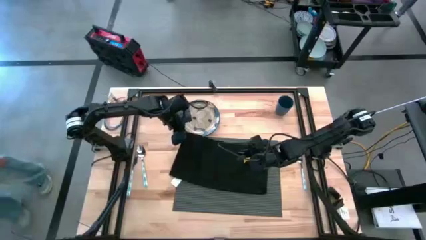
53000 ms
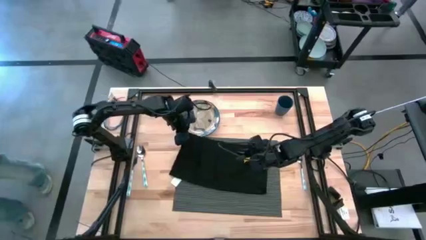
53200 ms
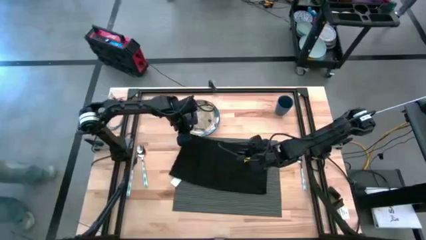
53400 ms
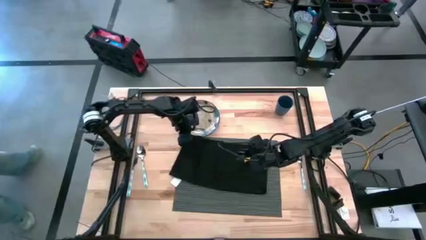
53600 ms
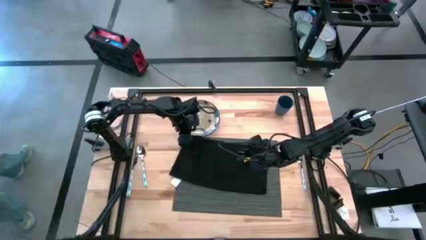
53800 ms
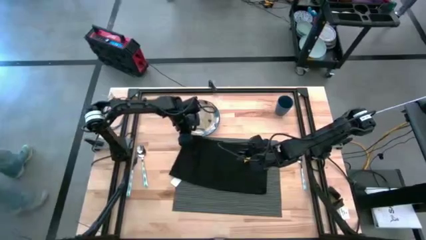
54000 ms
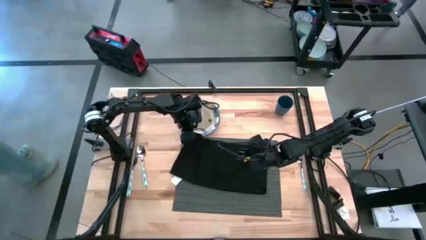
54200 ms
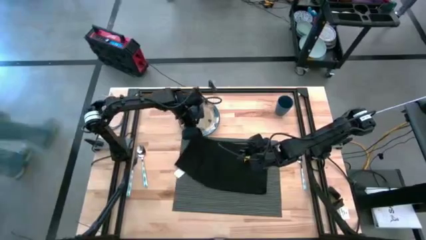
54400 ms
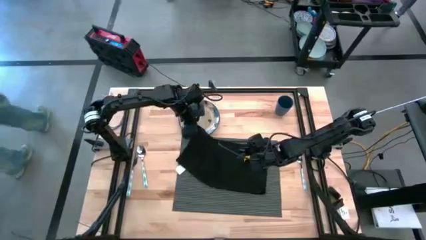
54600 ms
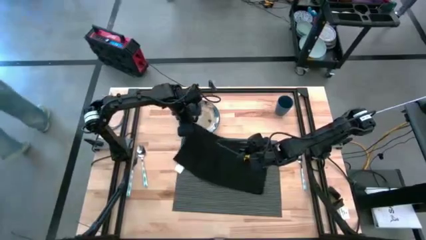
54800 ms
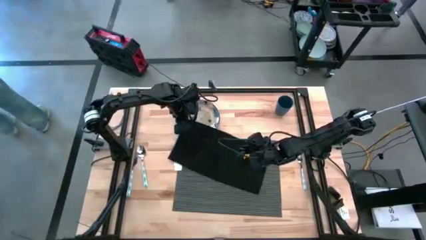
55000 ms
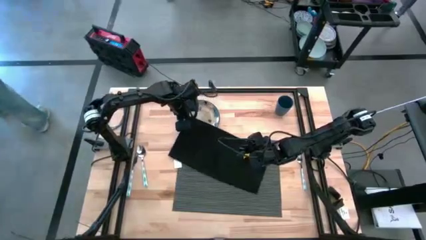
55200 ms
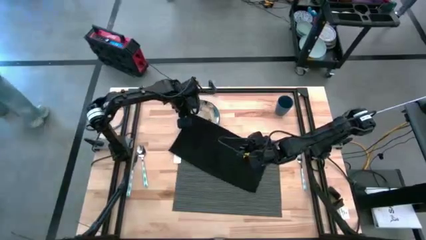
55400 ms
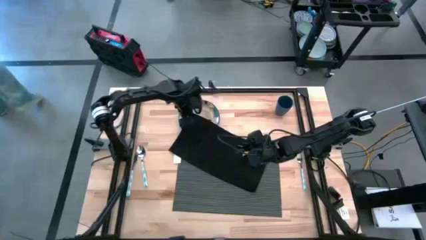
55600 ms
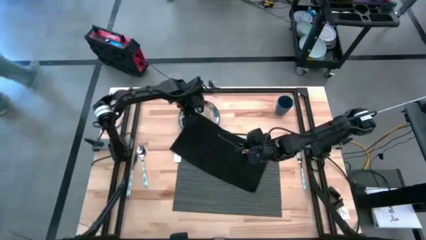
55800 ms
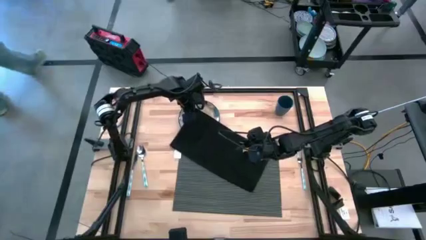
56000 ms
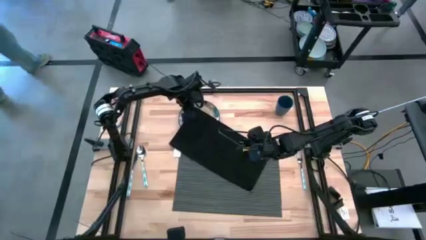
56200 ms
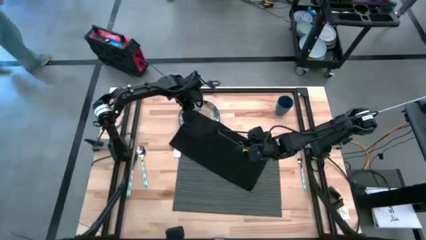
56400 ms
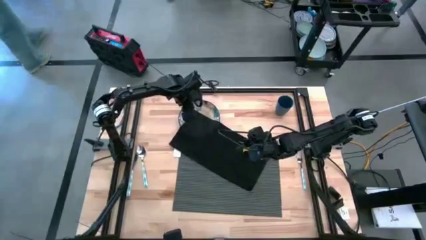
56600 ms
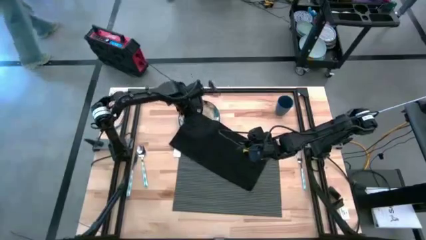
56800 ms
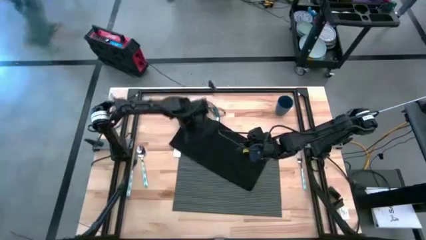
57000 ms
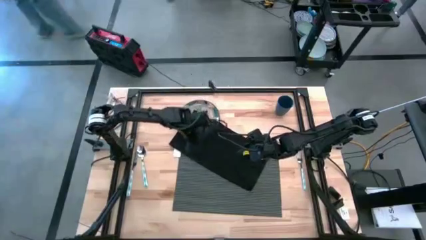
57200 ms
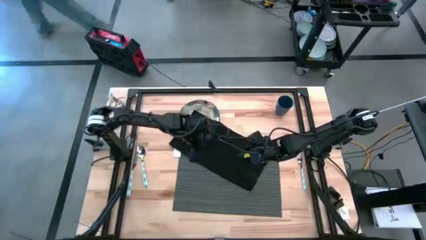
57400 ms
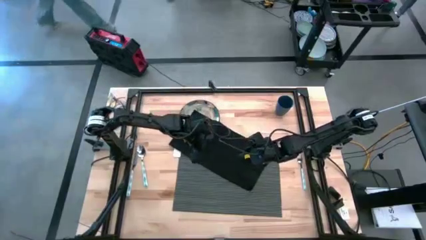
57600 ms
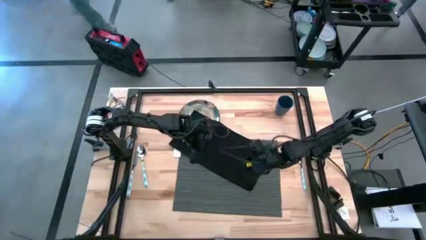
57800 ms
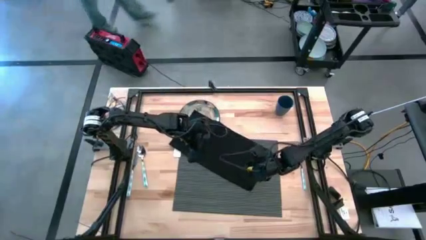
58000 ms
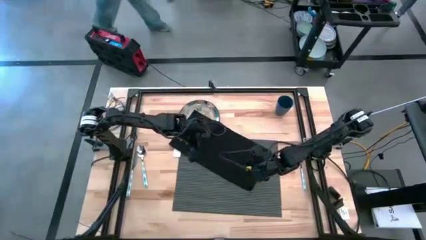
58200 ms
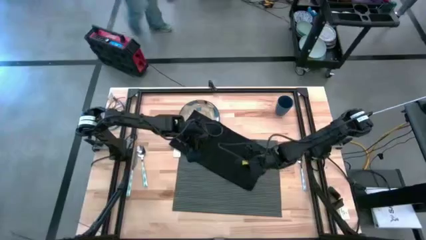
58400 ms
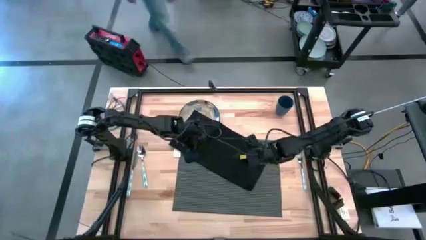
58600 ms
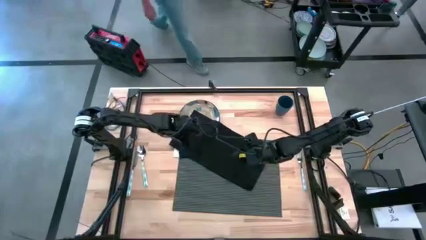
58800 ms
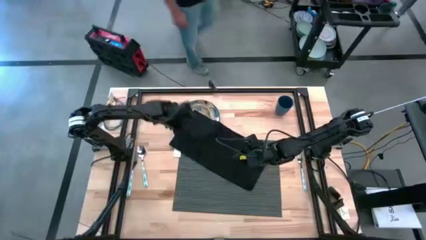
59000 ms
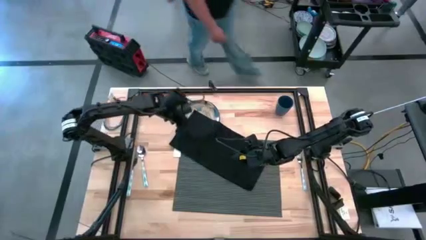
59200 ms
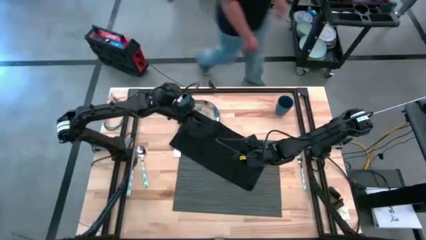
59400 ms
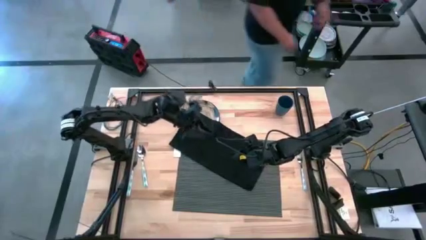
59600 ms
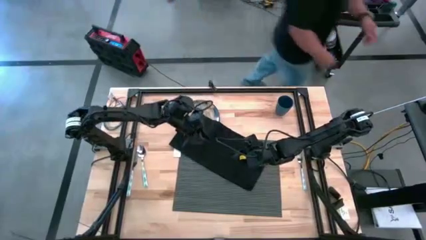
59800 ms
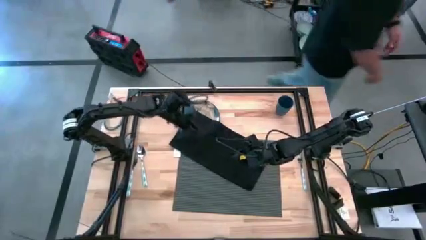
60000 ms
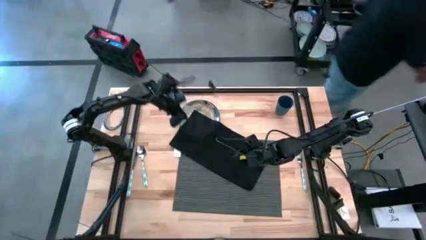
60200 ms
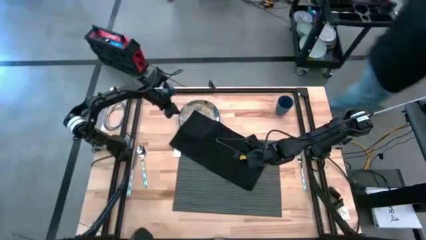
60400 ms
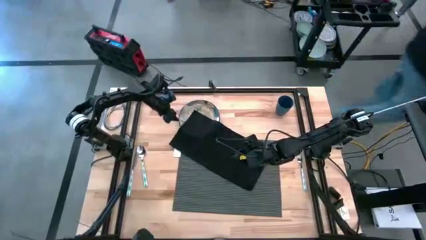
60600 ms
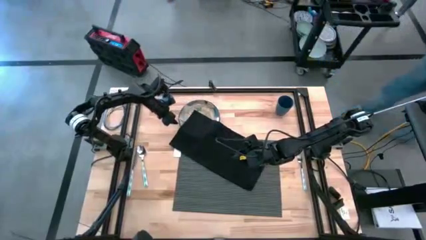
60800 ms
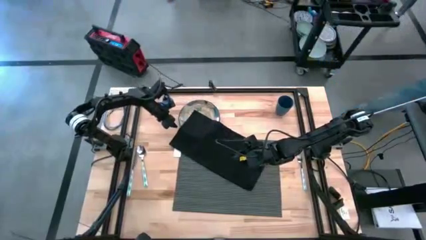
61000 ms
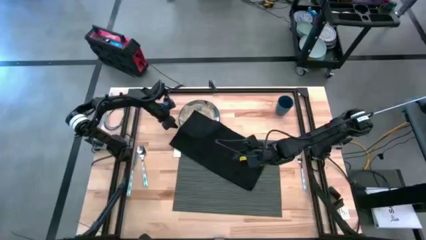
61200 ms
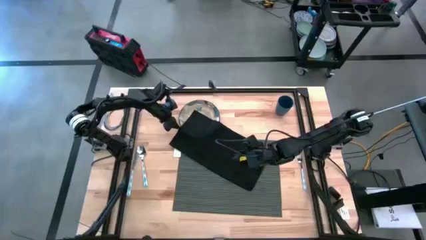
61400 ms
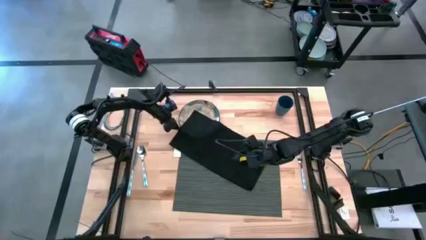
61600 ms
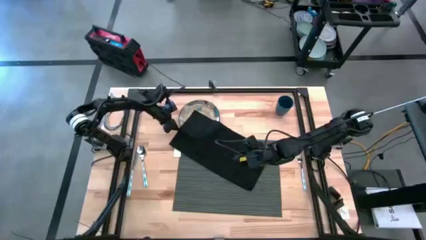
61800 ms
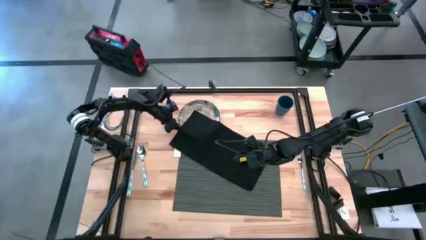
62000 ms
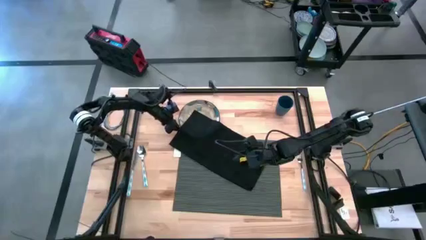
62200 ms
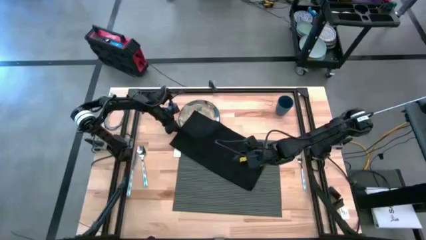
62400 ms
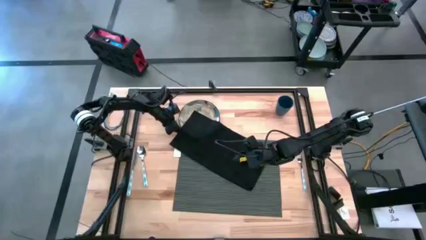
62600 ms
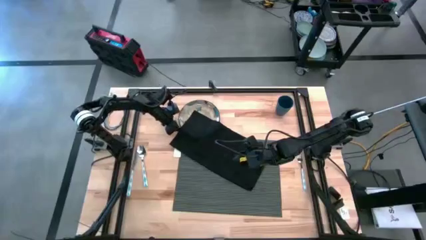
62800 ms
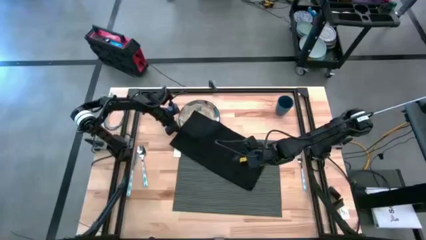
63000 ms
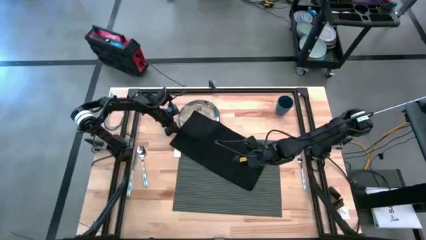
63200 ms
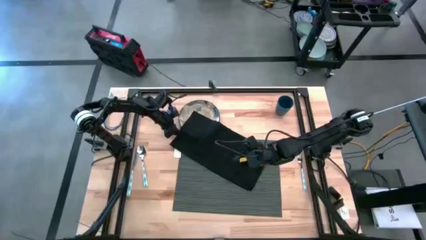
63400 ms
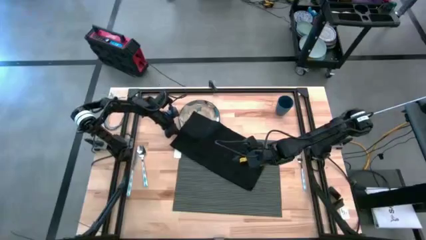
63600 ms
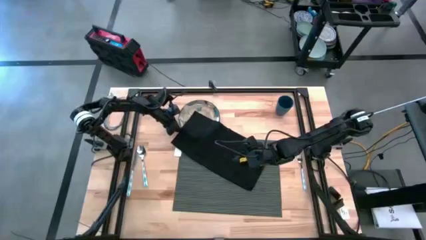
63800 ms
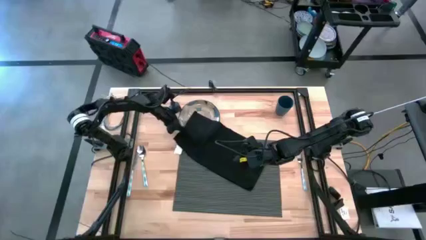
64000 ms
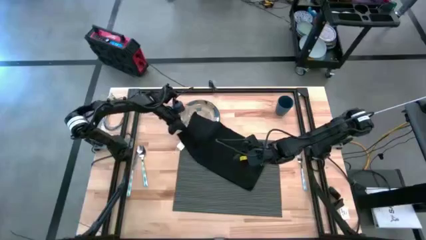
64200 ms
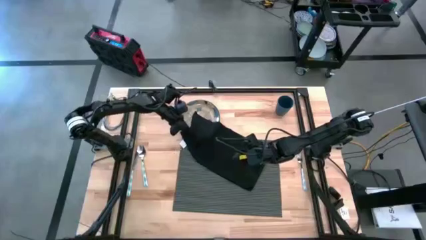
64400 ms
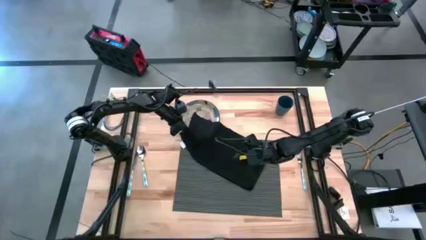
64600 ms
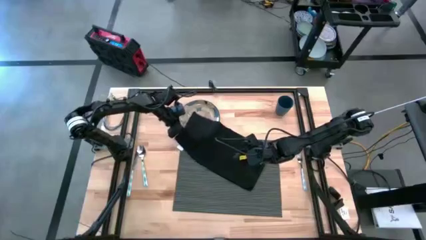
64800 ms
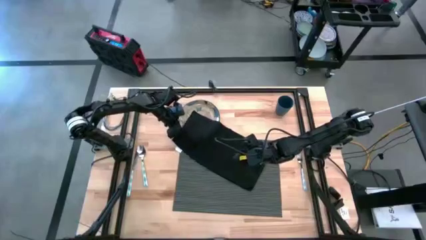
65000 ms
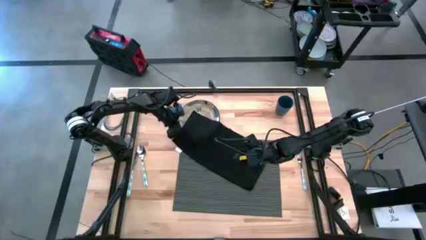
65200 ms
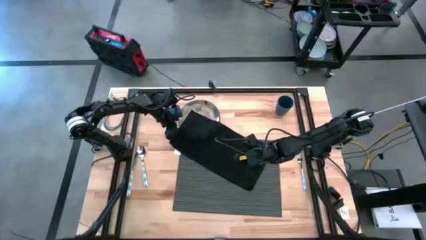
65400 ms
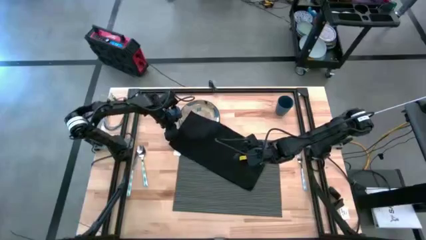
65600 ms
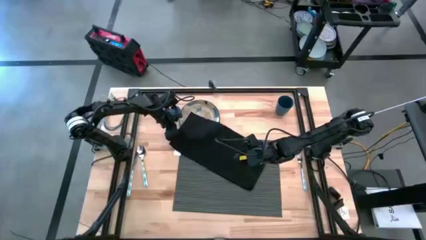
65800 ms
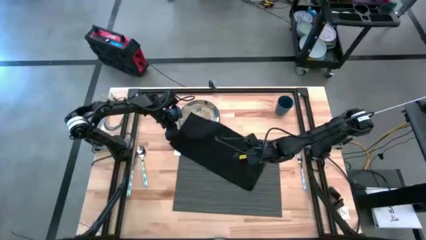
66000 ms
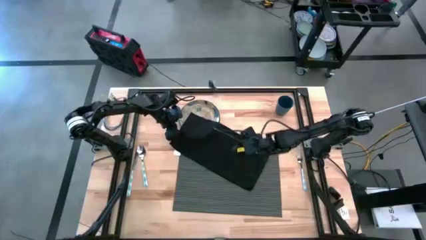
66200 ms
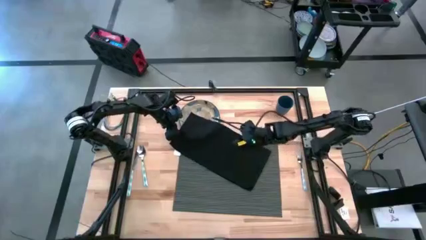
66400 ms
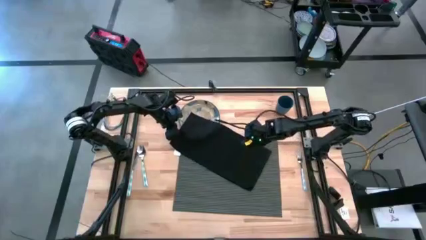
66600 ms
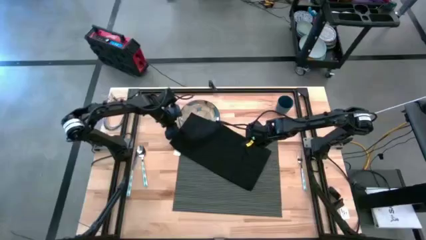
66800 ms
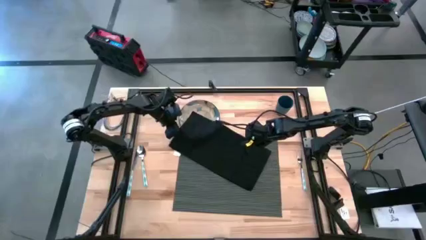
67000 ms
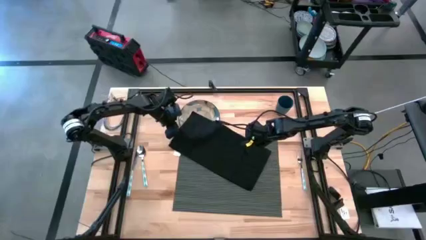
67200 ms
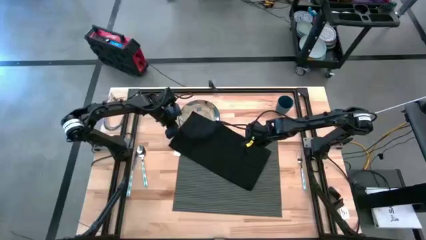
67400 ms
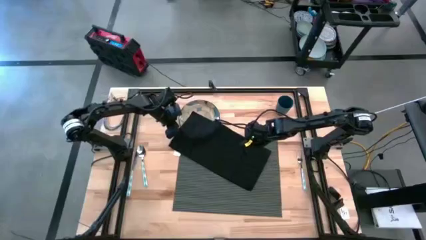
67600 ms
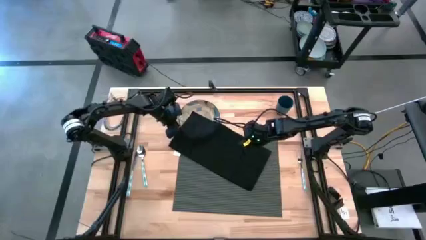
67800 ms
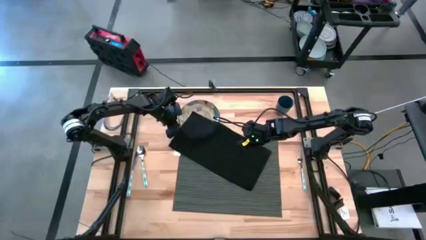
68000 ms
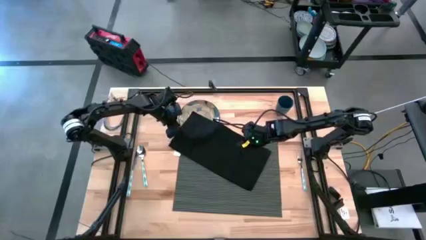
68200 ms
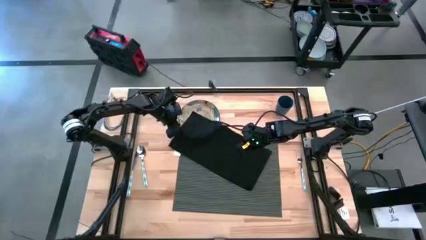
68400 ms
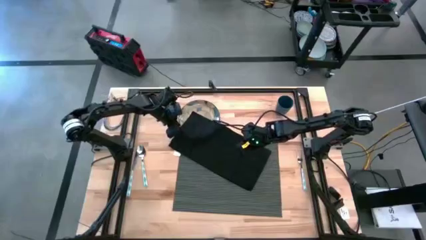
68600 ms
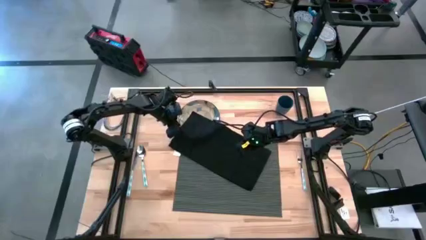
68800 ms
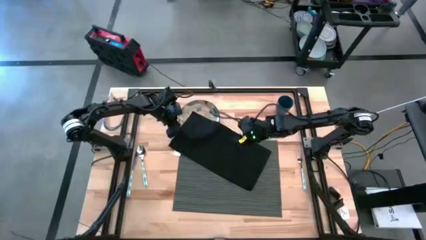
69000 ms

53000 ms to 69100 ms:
Task: Set table place
Fold the black napkin

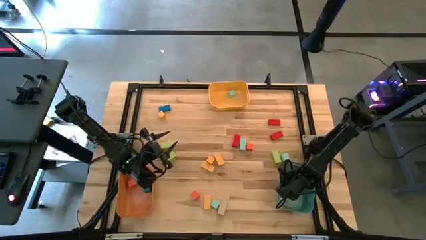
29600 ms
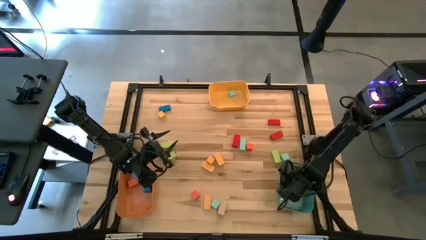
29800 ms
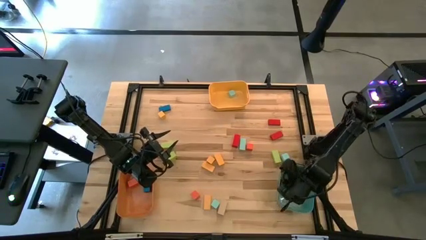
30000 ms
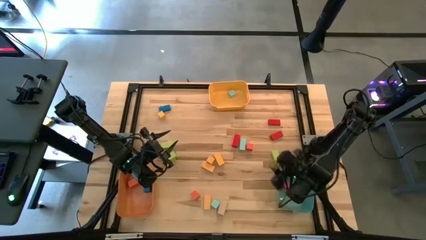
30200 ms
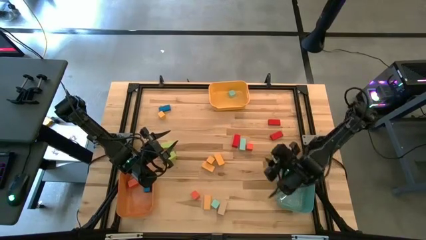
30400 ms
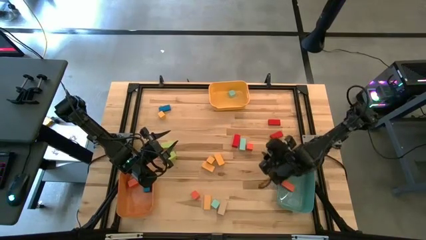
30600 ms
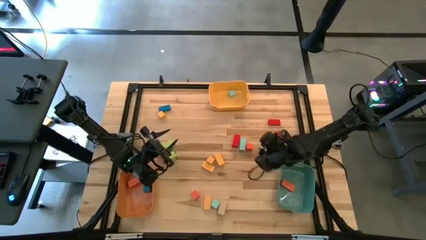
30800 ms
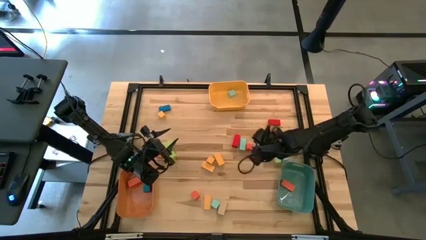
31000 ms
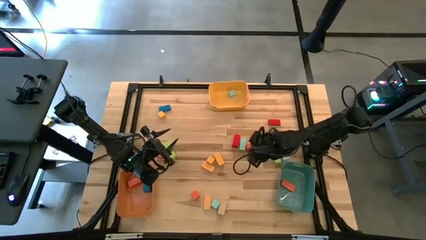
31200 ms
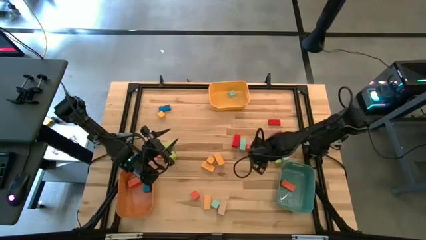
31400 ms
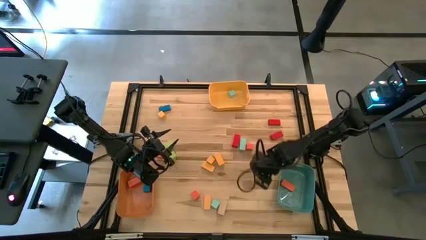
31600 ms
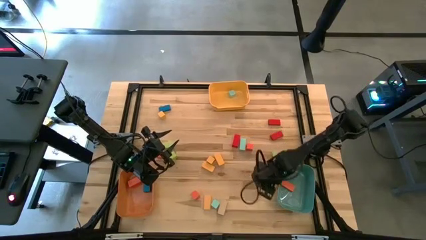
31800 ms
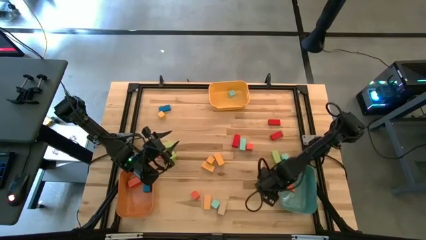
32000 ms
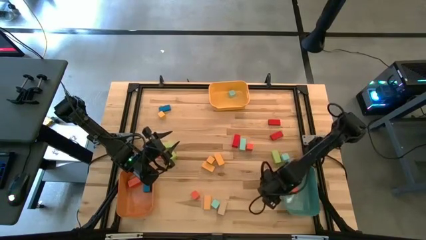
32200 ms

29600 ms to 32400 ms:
Task: Sort blocks by size
Adjust the green bin
